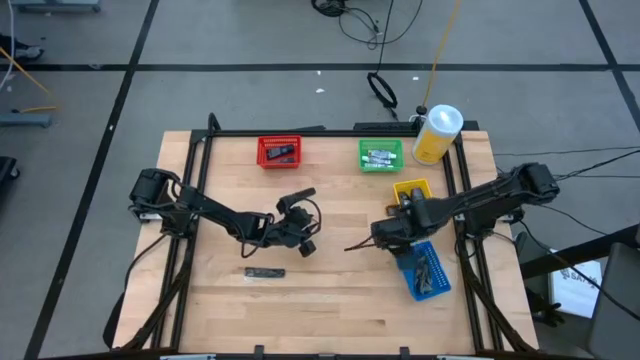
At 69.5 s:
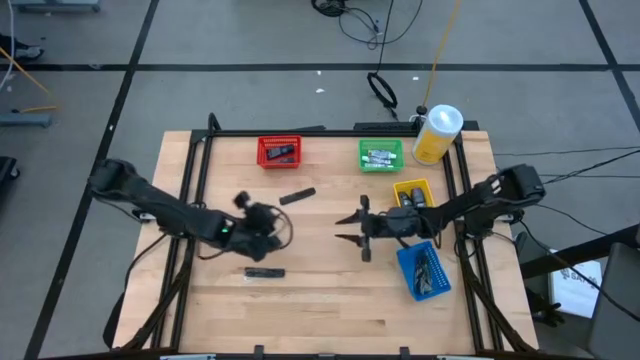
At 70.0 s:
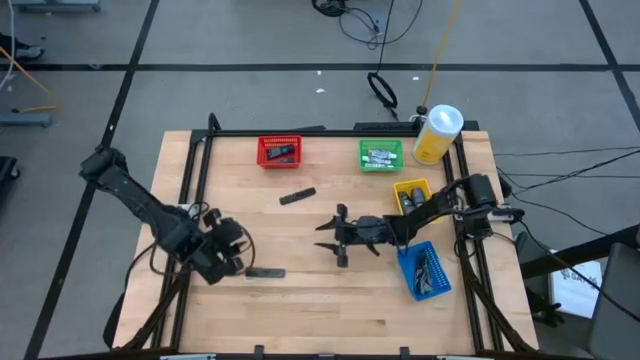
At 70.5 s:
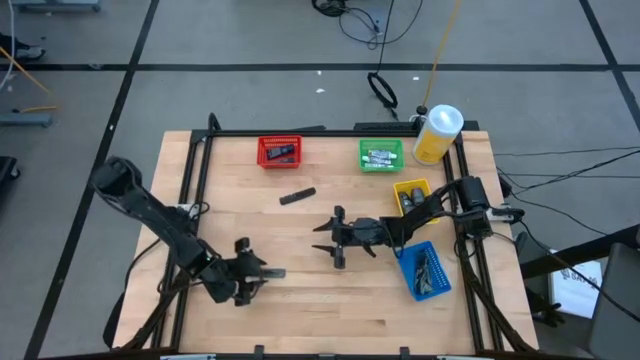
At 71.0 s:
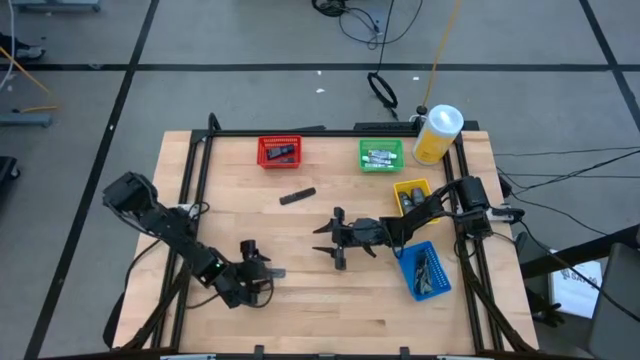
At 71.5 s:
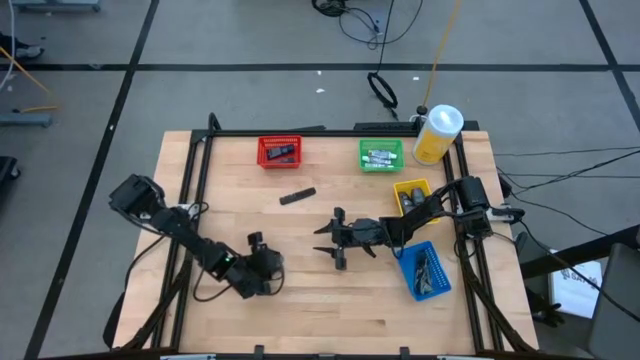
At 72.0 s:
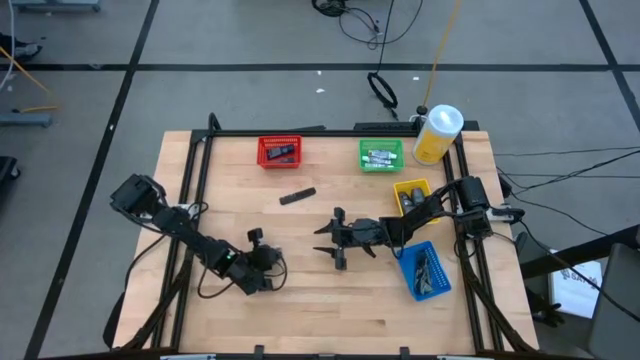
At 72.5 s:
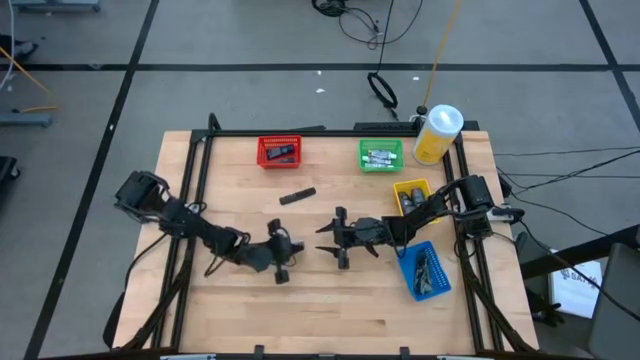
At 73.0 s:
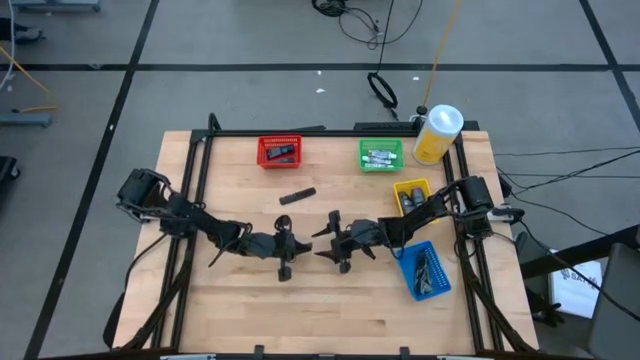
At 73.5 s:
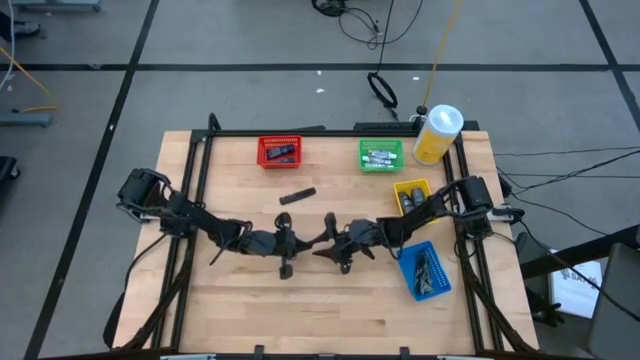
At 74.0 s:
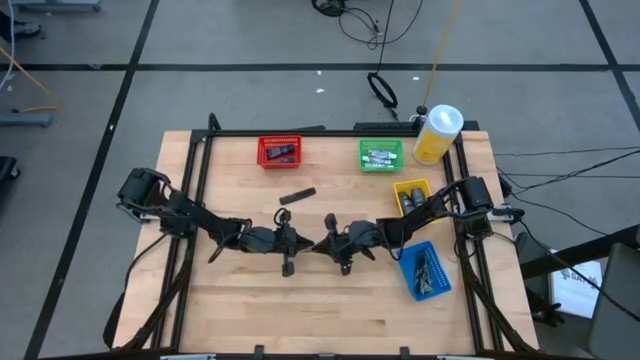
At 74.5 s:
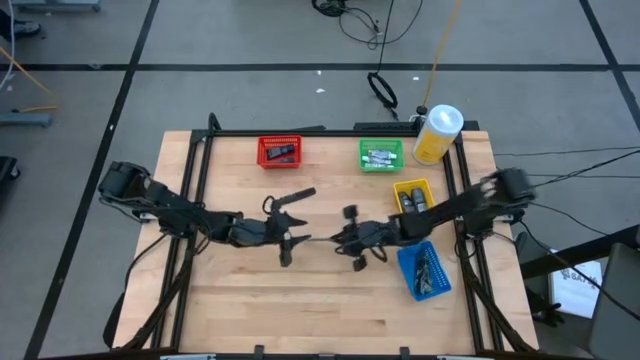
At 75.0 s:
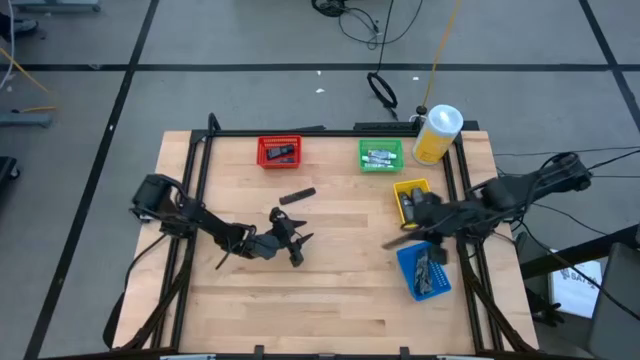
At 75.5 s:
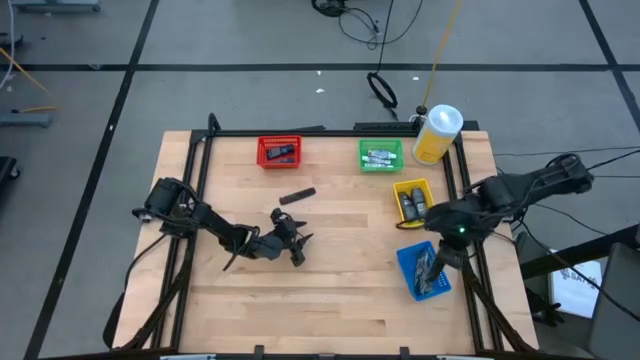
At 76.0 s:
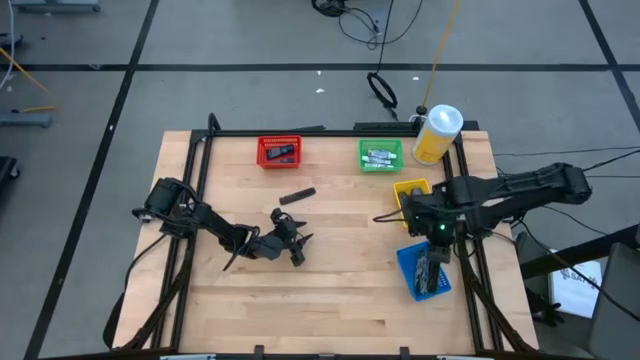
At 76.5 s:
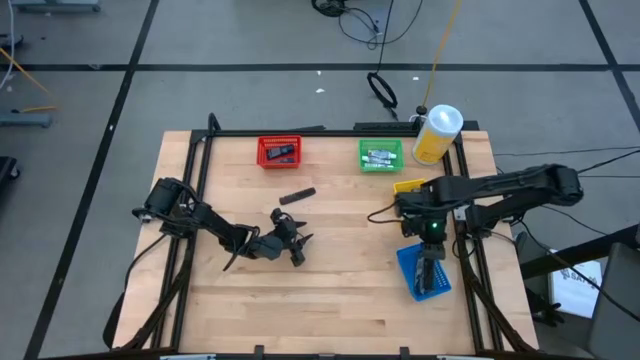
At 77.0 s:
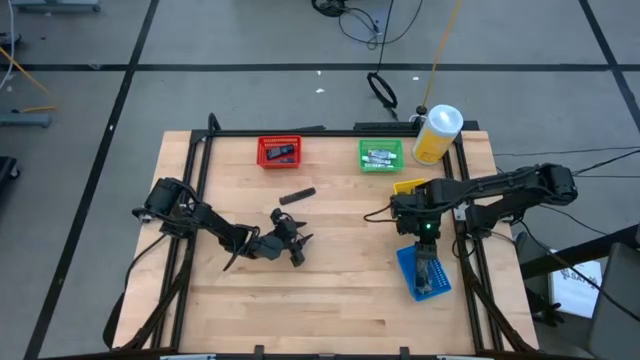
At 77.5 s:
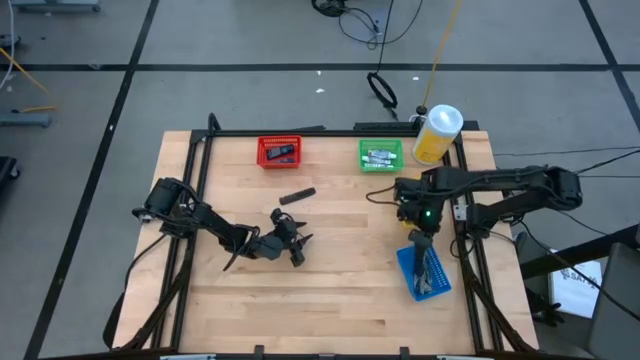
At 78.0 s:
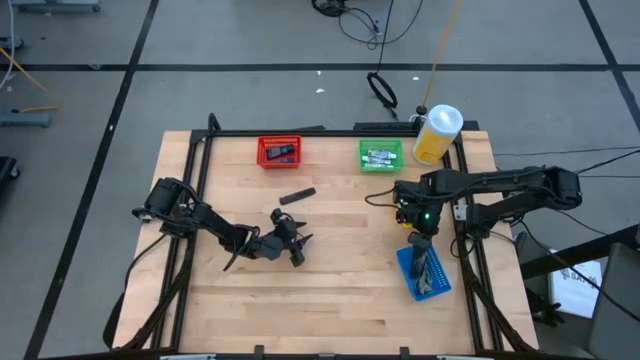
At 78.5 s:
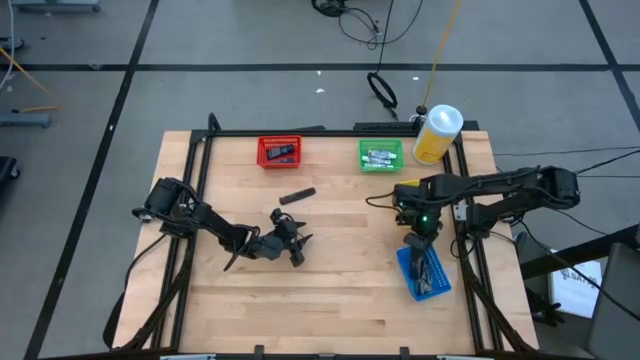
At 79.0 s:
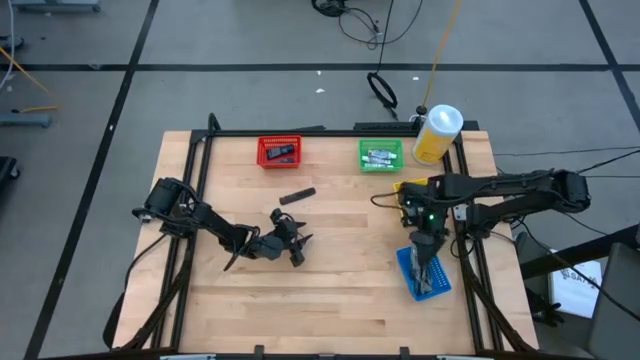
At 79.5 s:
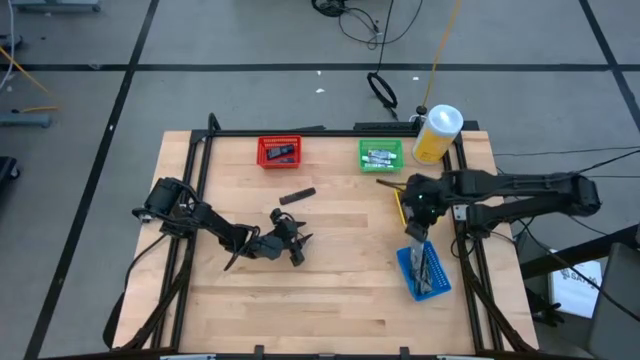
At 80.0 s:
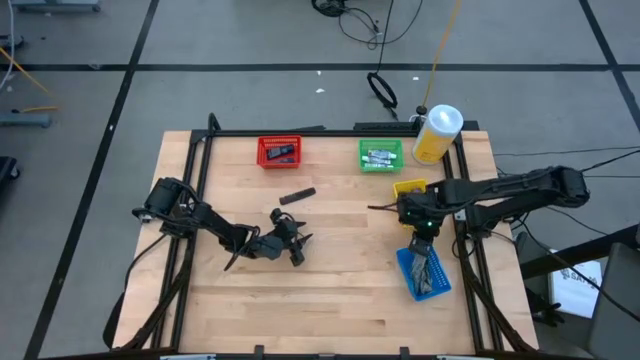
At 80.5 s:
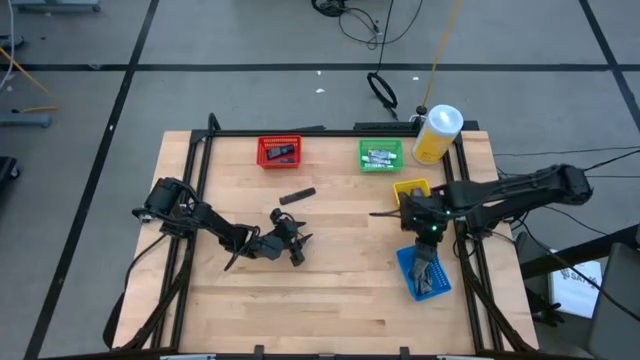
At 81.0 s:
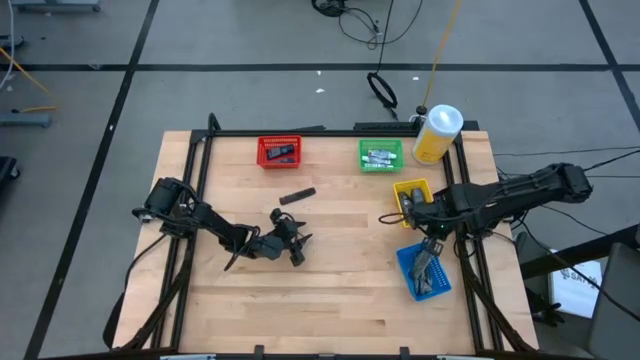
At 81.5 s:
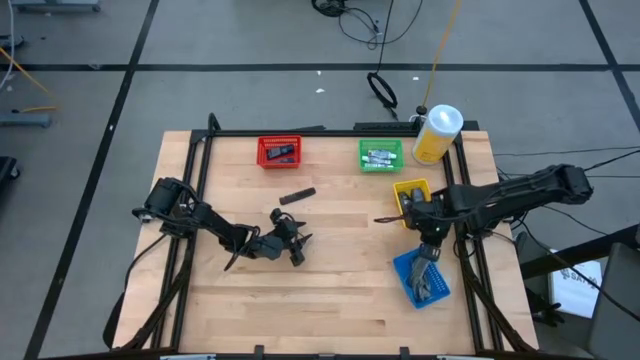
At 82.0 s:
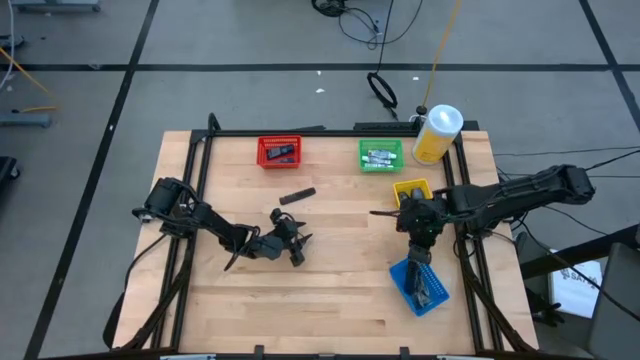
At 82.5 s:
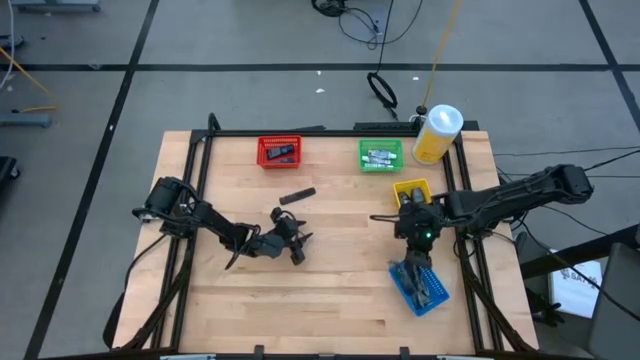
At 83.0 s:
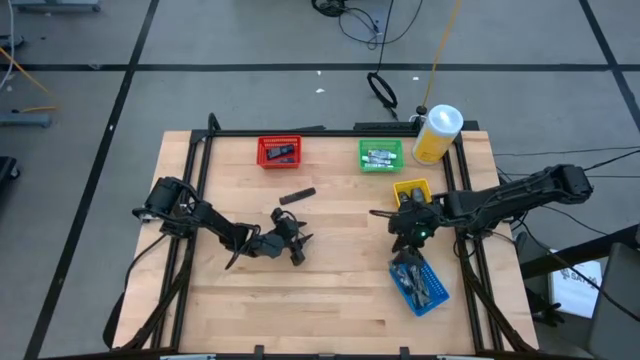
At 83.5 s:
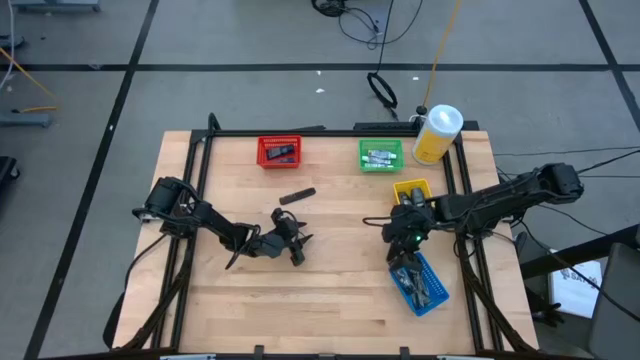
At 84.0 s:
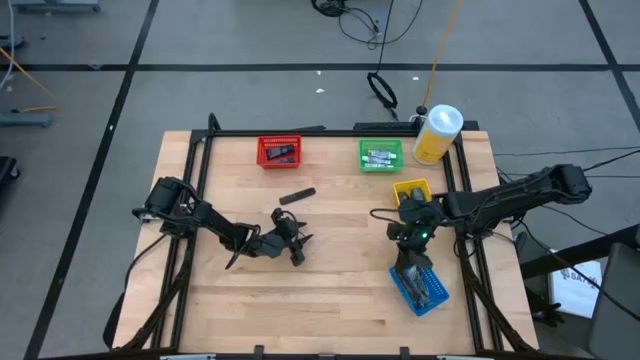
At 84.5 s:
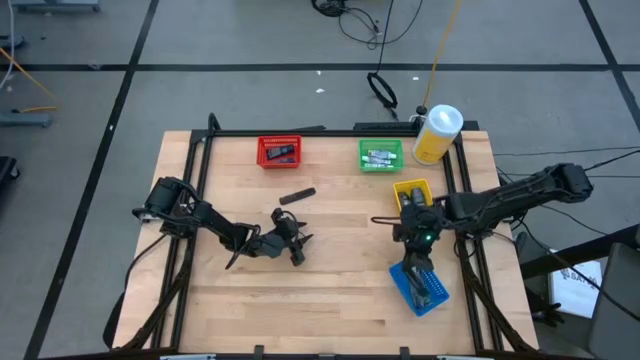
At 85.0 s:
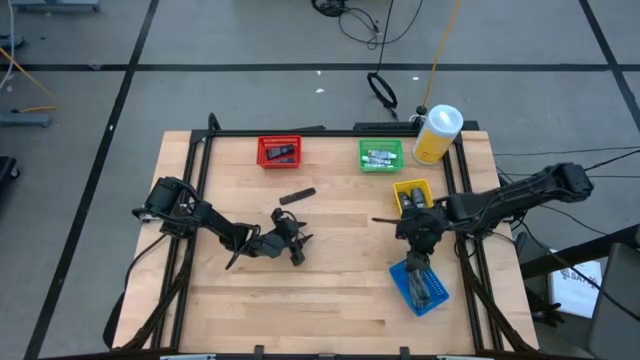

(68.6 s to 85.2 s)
Task: Pick & Place Travel size toiletries
Put the black comb into the blue bin

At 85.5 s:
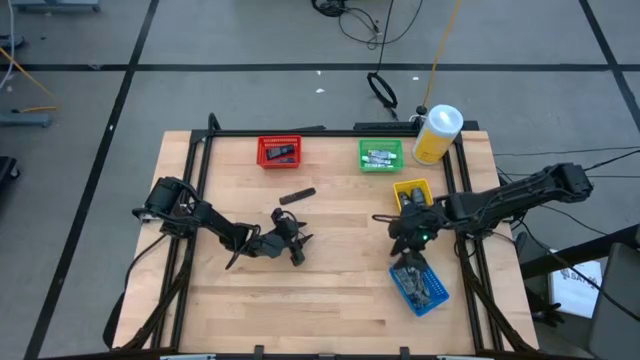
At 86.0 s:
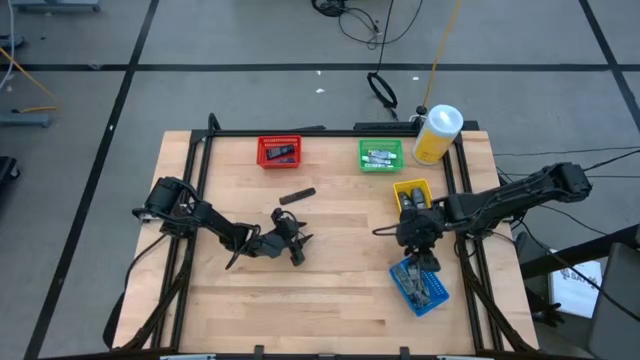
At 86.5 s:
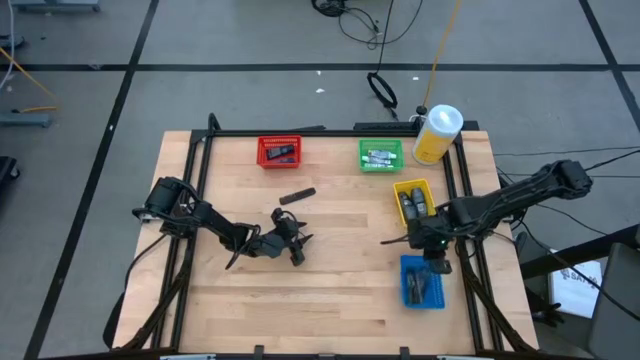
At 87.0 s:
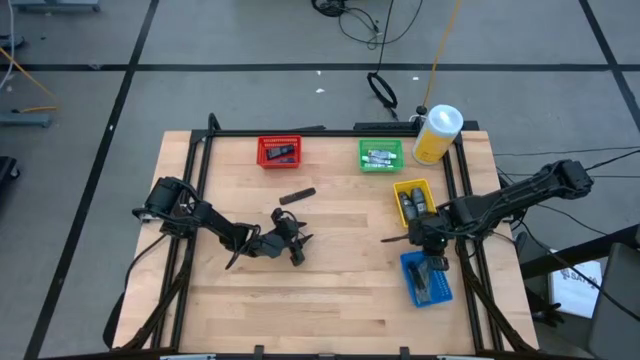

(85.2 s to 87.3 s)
Adjust the blue bin

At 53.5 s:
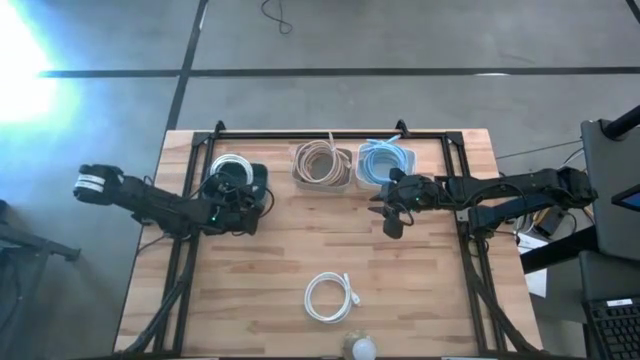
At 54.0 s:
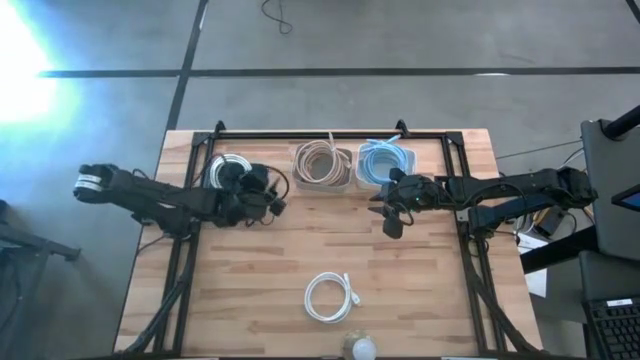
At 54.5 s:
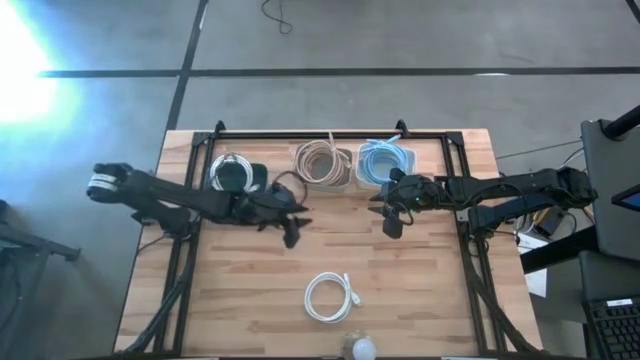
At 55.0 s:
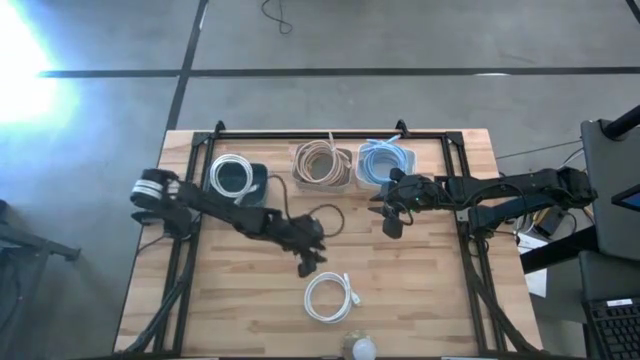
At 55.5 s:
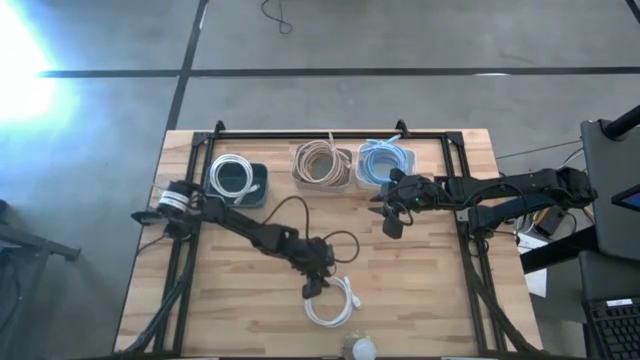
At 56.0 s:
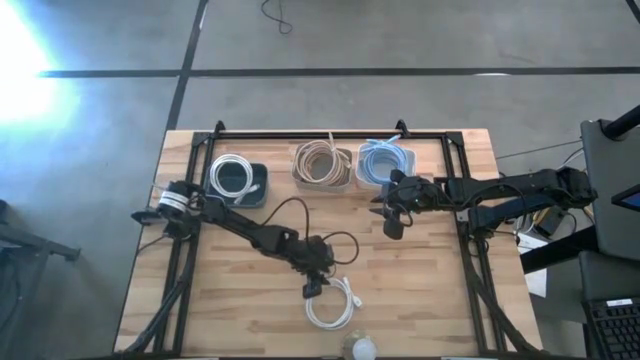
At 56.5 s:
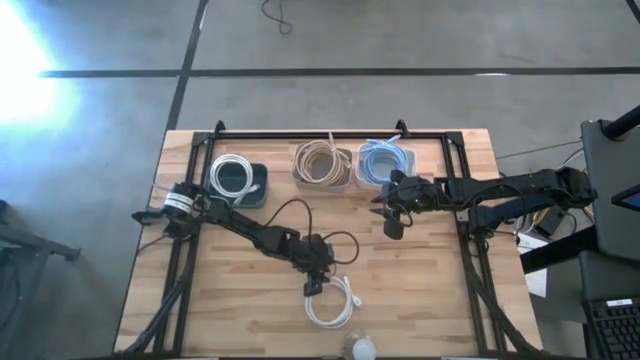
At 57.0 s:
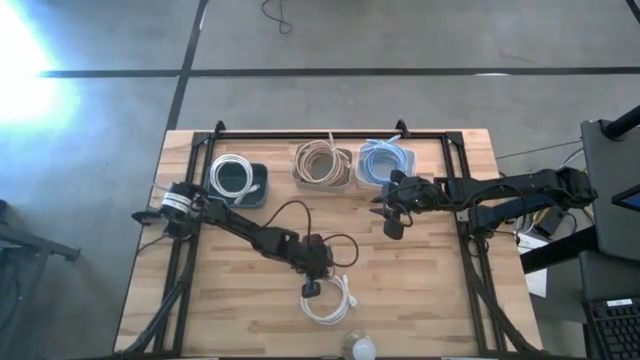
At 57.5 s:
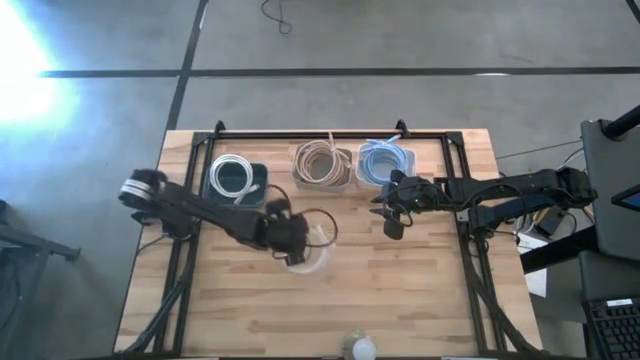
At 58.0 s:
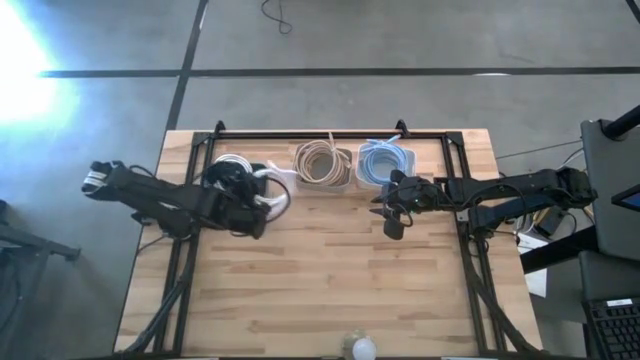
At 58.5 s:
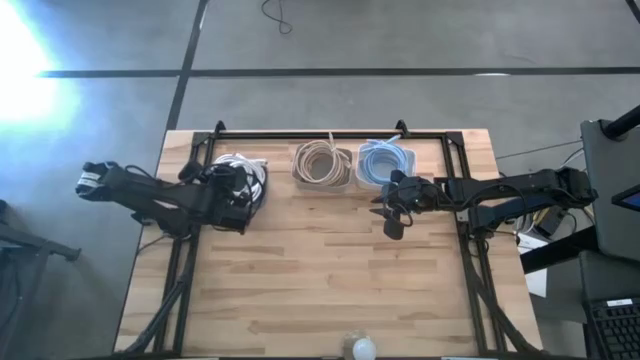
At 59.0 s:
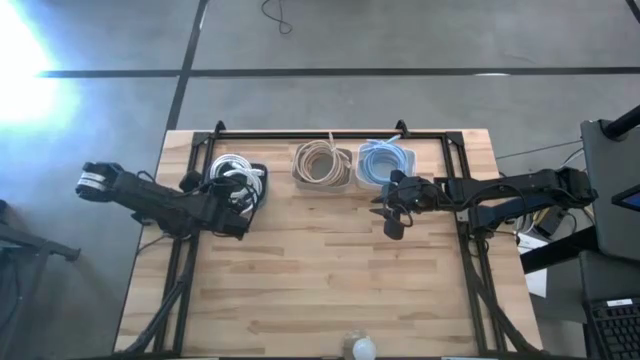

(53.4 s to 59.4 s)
Task: Pick & Place USB Port
Put the white USB cable into the green bin
